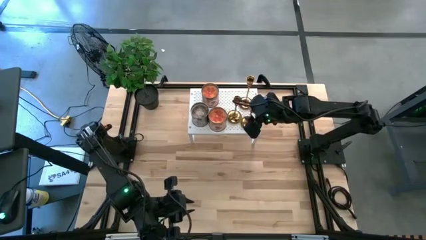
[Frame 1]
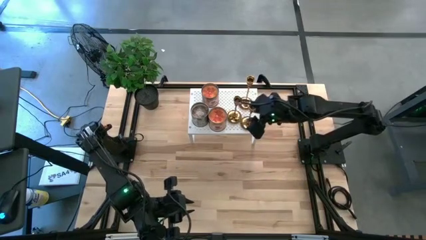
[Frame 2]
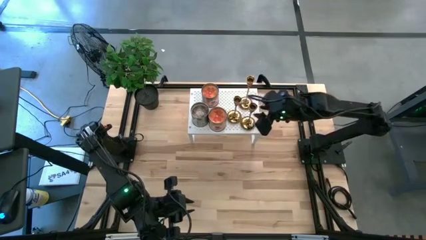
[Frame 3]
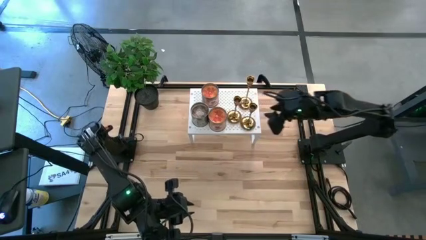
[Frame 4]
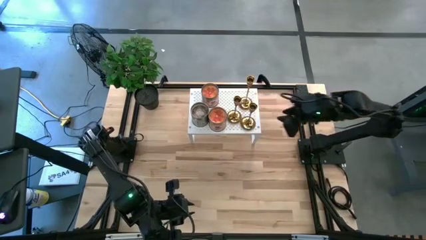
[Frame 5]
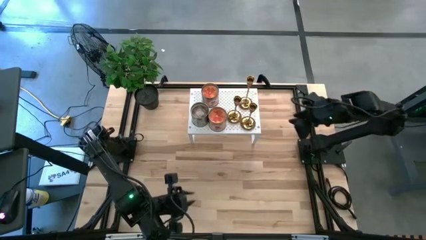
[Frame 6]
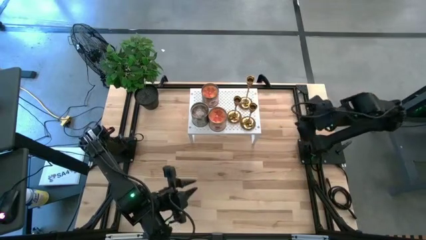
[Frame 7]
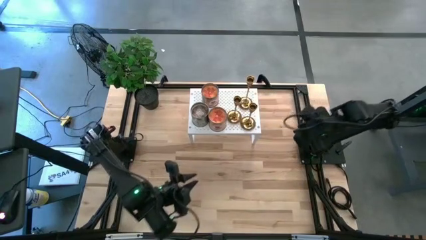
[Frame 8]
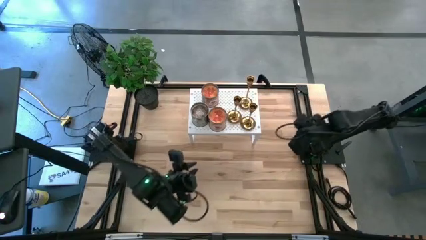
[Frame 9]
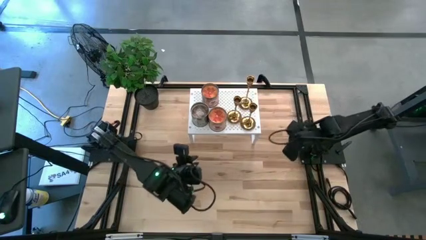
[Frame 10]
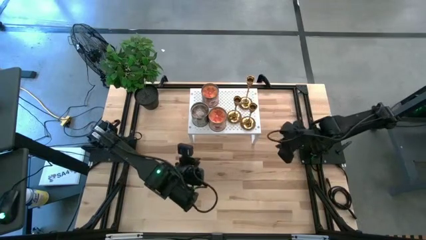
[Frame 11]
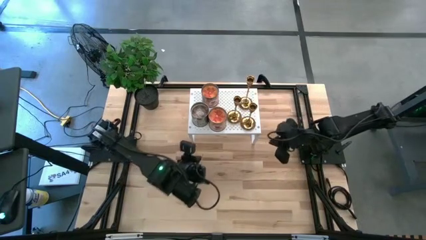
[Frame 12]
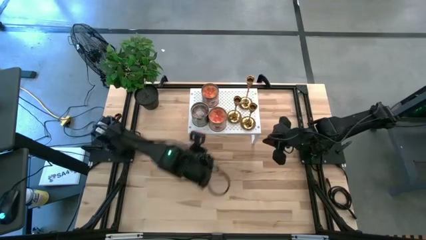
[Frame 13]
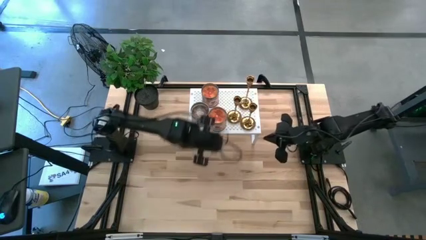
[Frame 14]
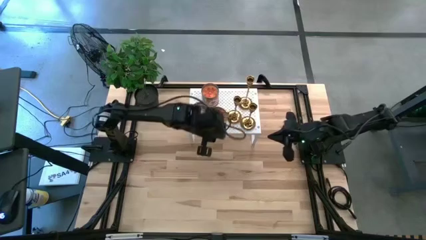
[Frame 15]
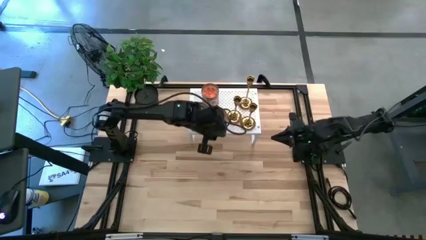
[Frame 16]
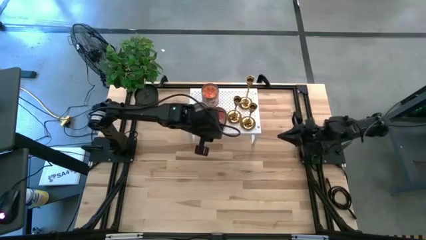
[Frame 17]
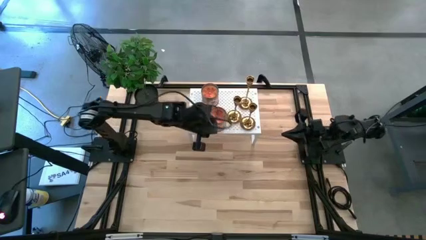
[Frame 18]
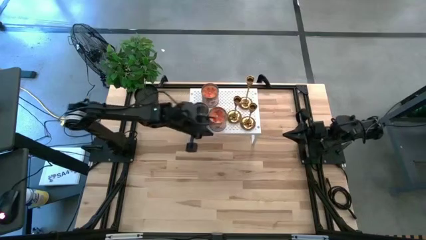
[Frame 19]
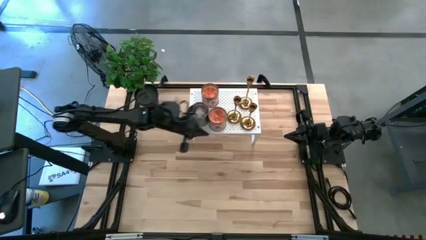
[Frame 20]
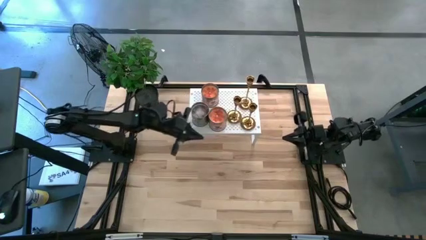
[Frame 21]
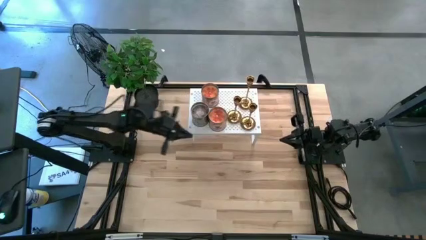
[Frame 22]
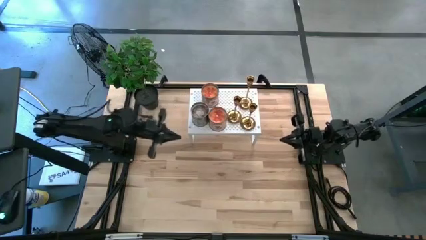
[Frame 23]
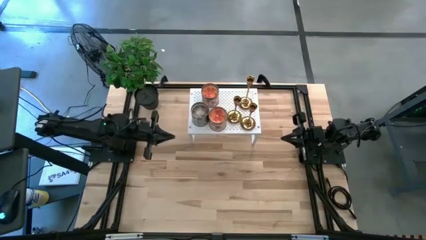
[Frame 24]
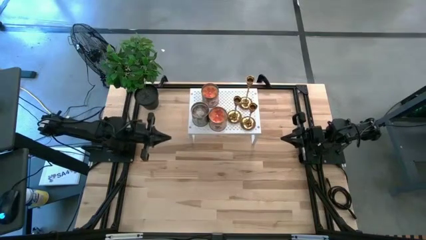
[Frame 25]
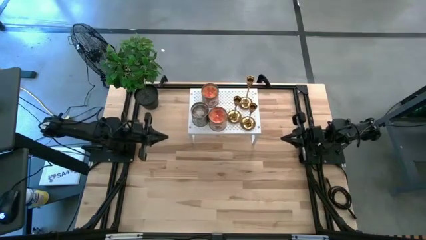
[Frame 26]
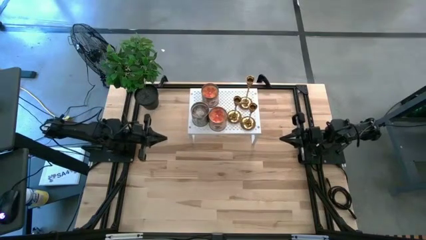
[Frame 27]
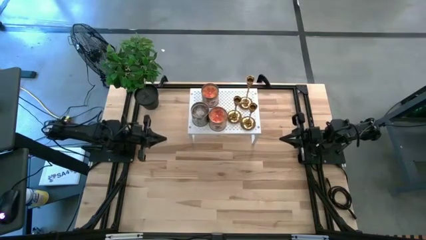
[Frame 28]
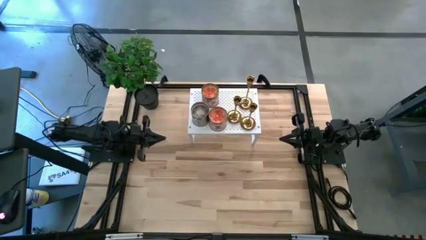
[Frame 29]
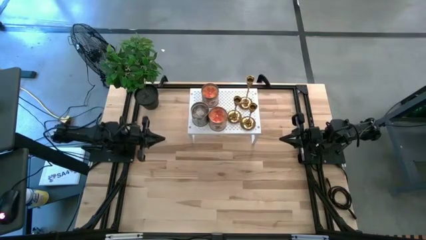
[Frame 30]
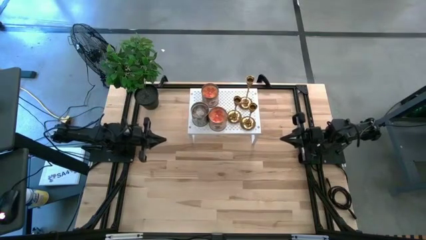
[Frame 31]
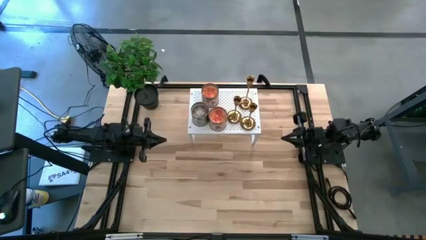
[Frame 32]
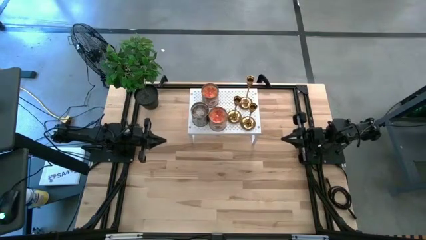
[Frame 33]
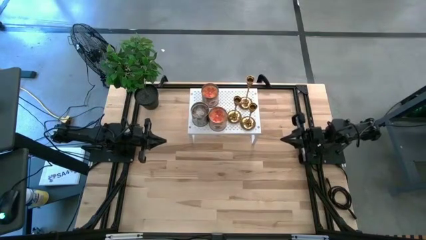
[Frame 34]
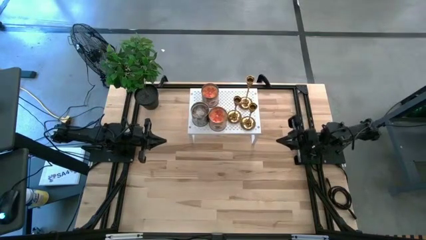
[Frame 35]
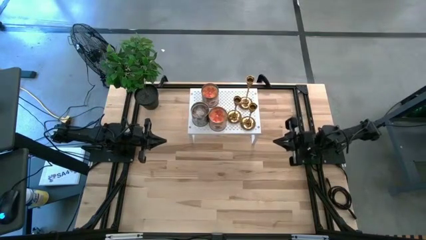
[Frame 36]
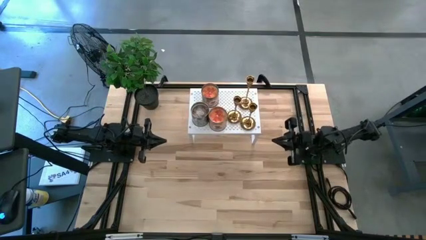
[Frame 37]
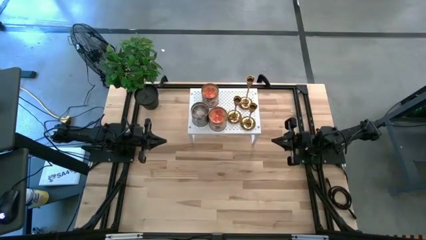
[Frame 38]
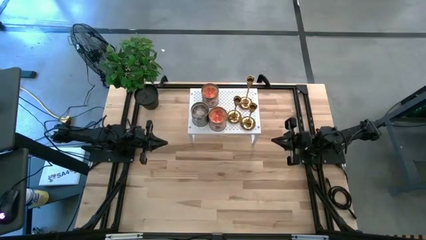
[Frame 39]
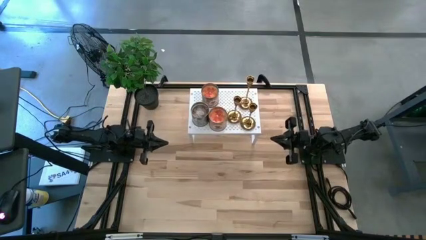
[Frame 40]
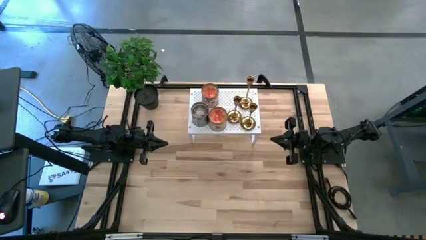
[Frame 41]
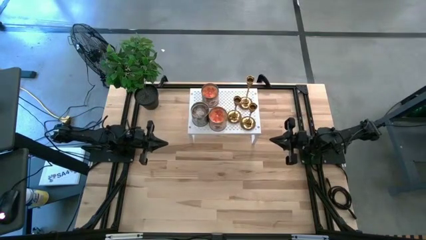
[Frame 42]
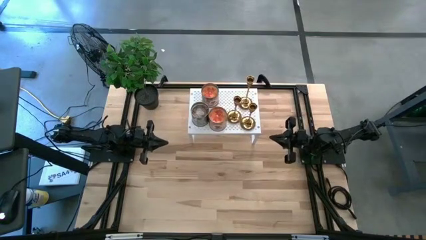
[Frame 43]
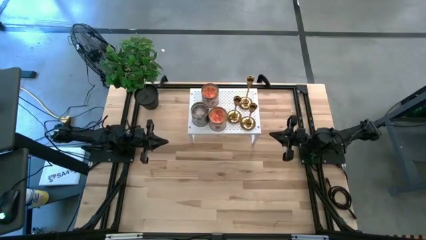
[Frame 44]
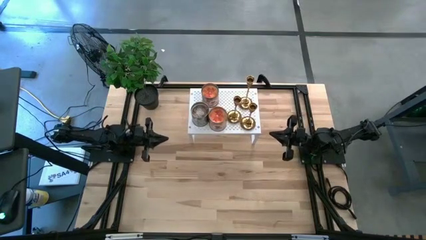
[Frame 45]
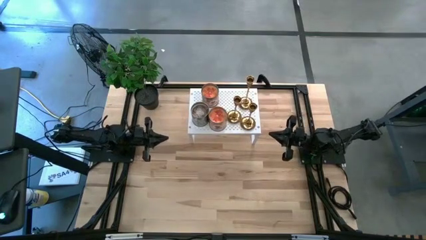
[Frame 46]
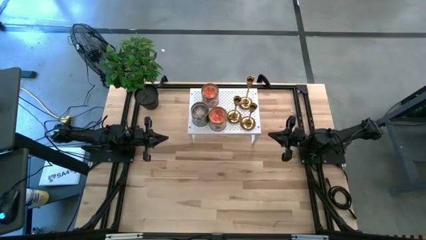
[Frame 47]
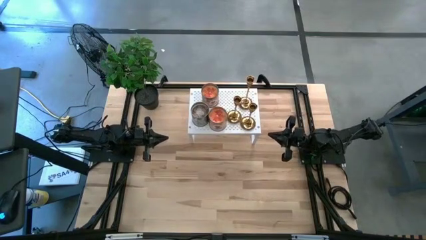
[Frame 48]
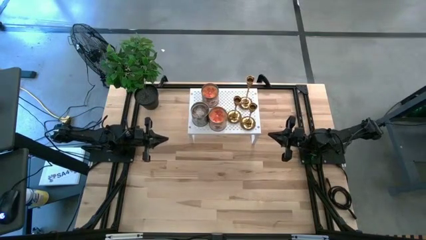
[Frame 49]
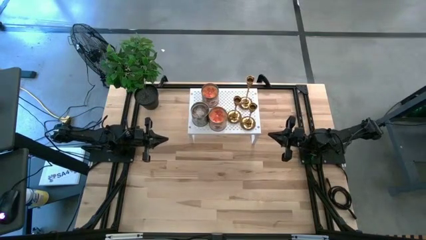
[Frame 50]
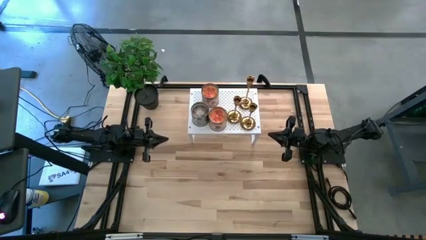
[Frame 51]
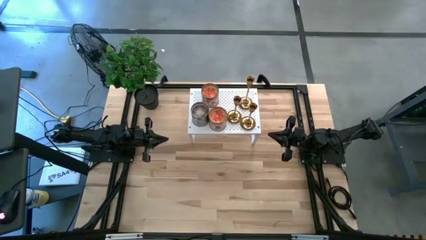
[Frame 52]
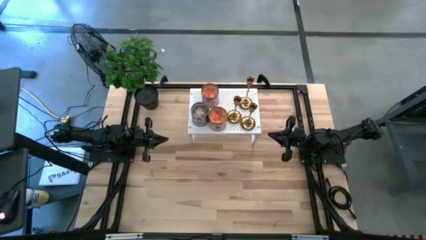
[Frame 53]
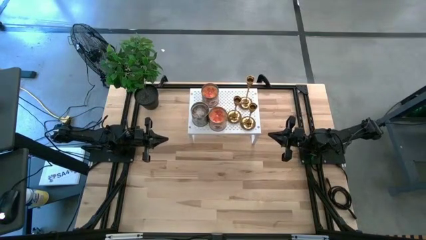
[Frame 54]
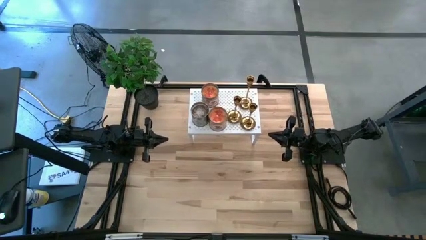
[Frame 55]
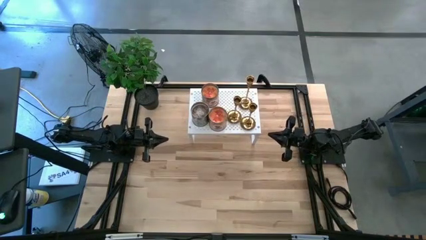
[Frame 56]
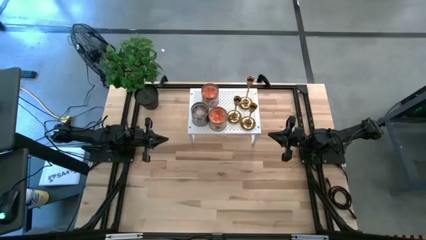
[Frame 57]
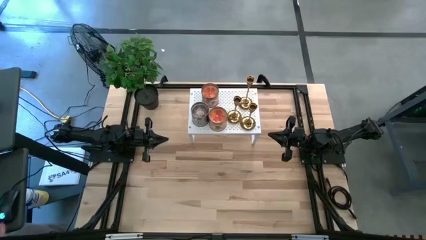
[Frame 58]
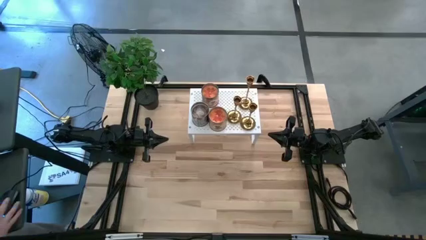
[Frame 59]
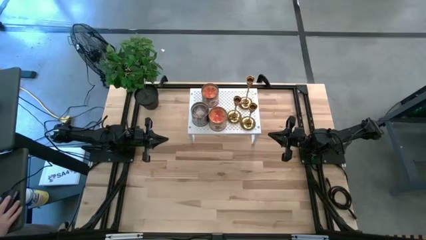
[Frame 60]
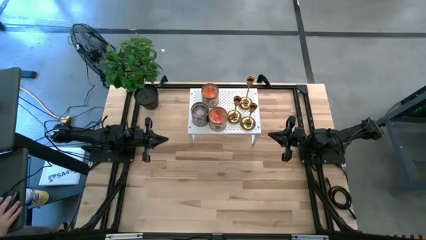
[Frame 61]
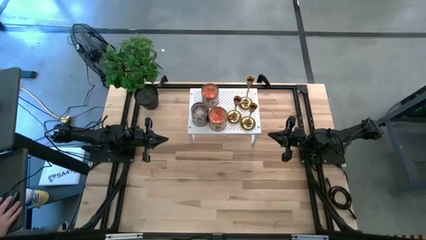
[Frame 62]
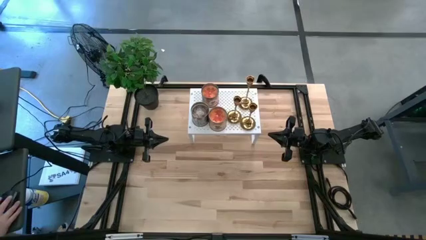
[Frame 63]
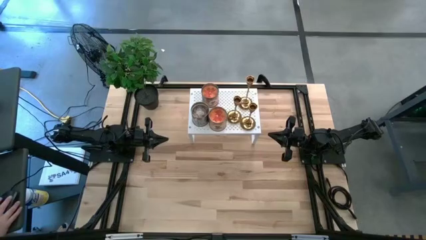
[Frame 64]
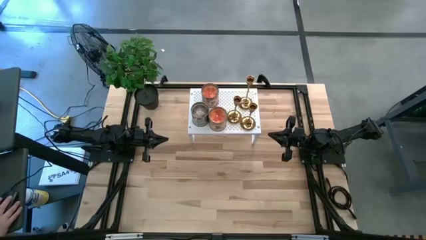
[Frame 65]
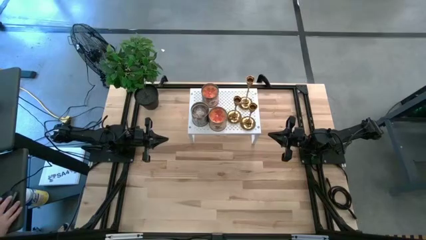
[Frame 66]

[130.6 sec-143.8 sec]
Task: Pick & Place candle stick holders
Return to Home Position

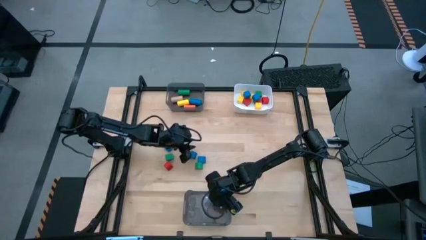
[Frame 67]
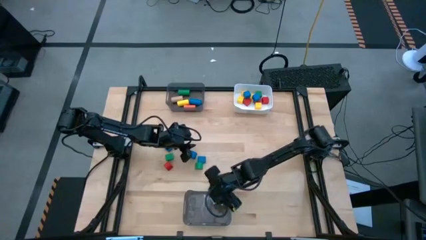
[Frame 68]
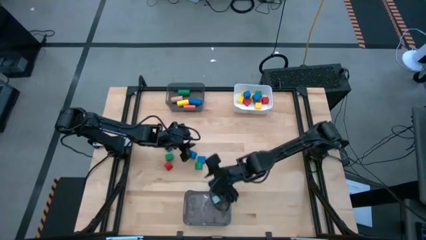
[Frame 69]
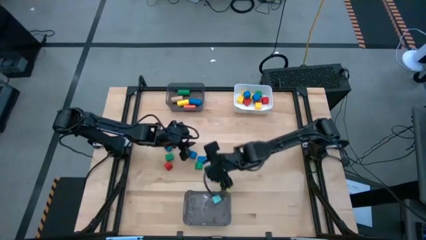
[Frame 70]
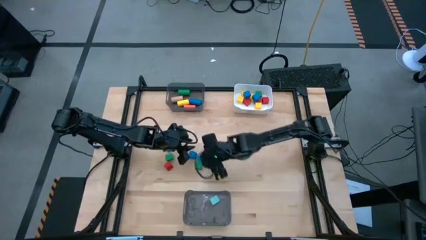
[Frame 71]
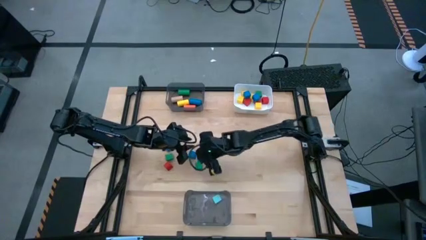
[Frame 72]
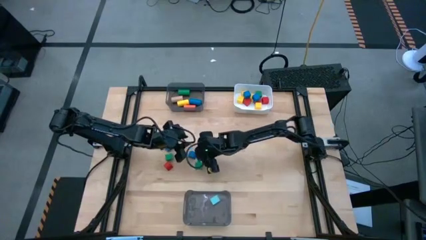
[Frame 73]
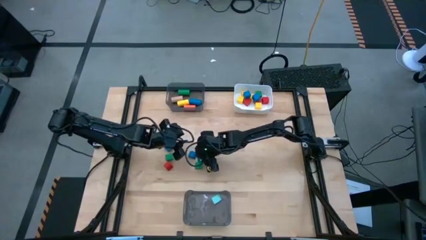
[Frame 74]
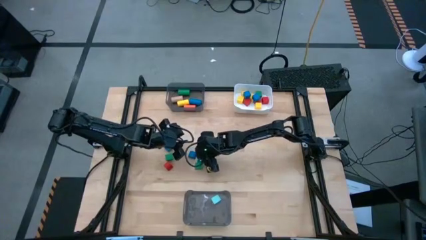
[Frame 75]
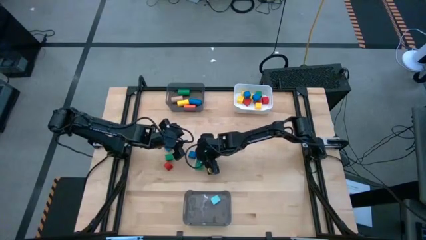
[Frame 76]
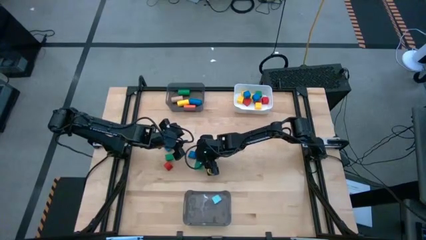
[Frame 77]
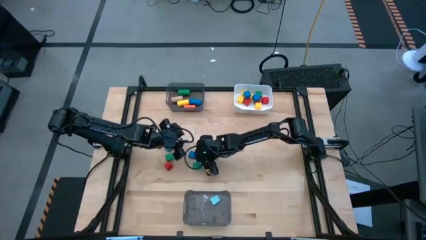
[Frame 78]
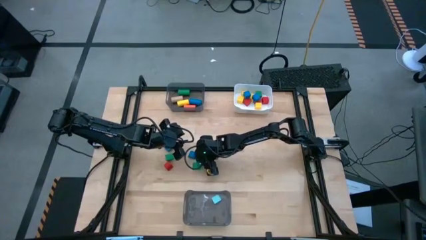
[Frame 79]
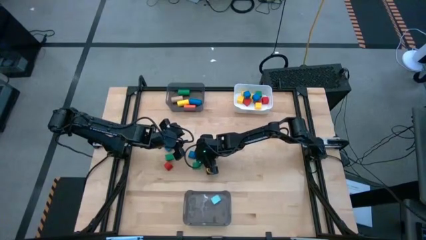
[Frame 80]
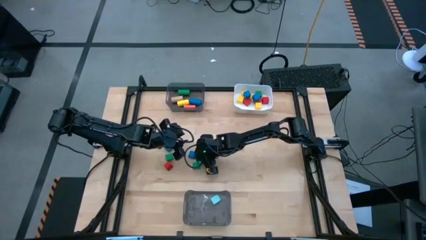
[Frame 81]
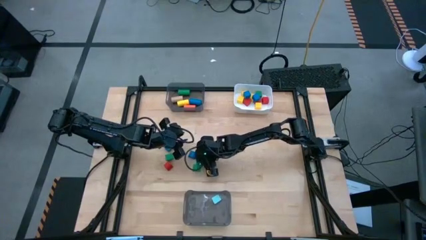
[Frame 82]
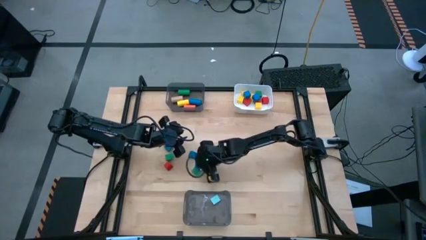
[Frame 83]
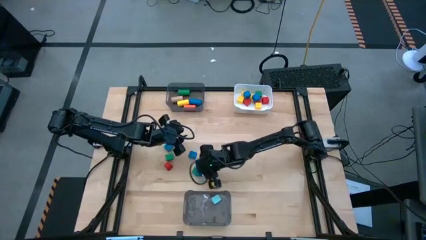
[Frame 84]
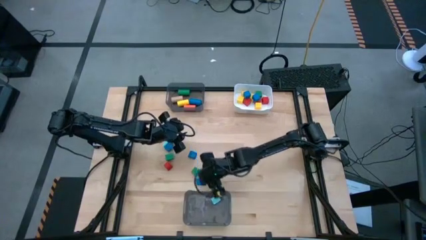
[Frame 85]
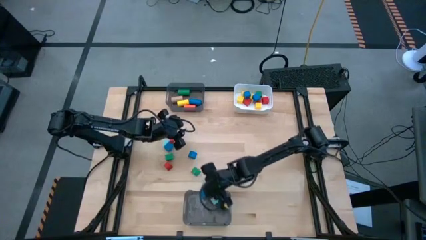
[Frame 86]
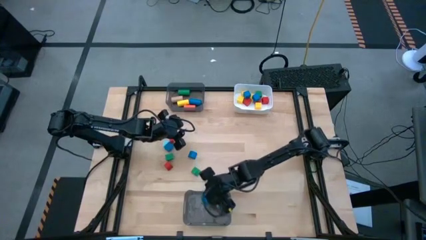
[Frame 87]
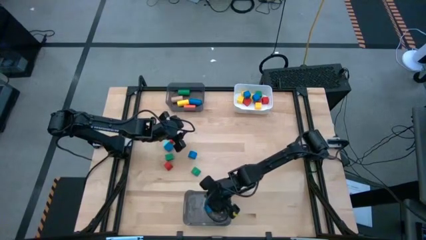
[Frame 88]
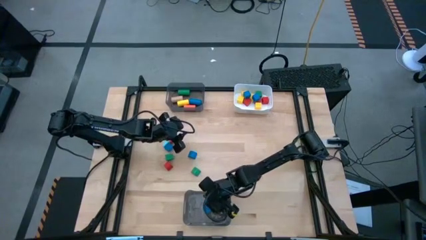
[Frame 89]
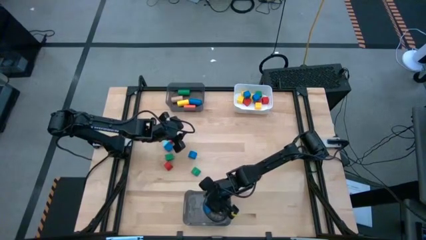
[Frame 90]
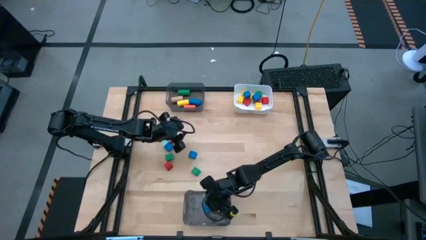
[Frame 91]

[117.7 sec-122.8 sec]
Task: Sort blocks by size
Put the blue half circle block into the bottom black bin
